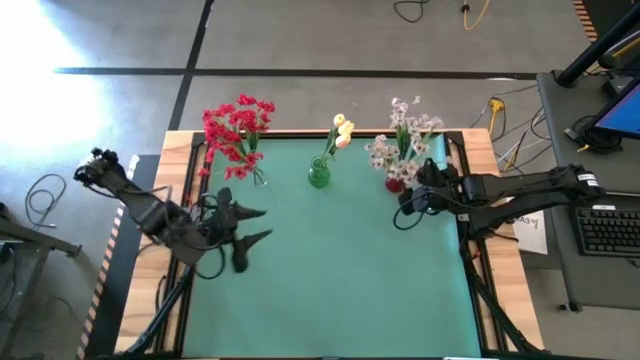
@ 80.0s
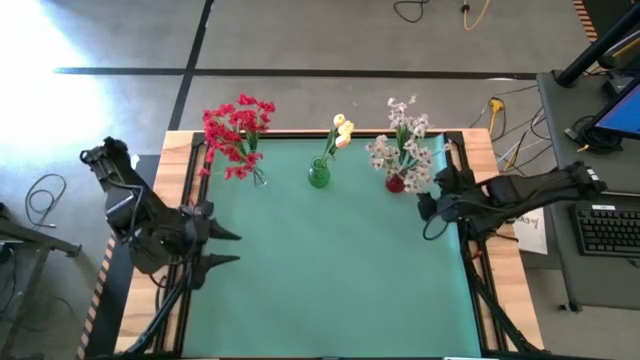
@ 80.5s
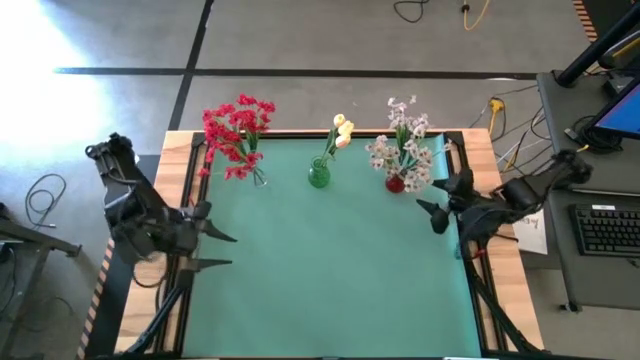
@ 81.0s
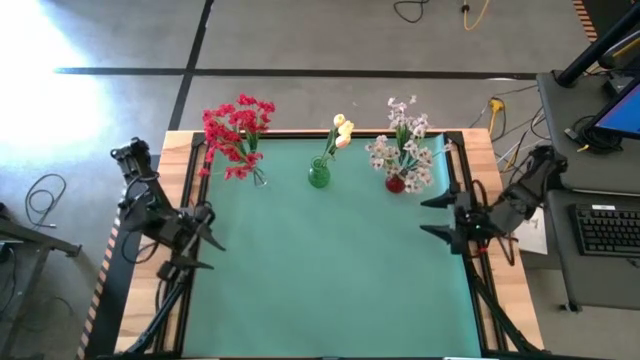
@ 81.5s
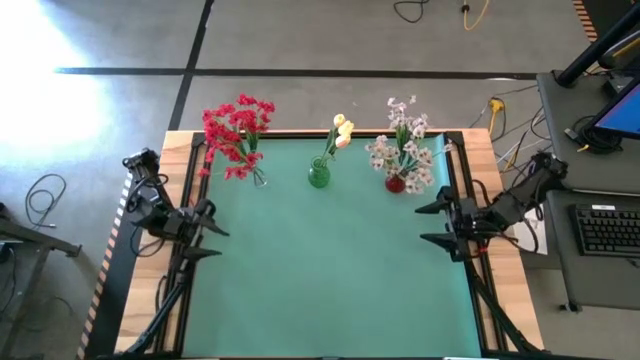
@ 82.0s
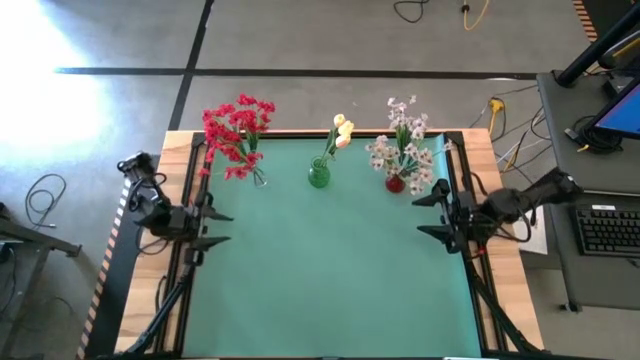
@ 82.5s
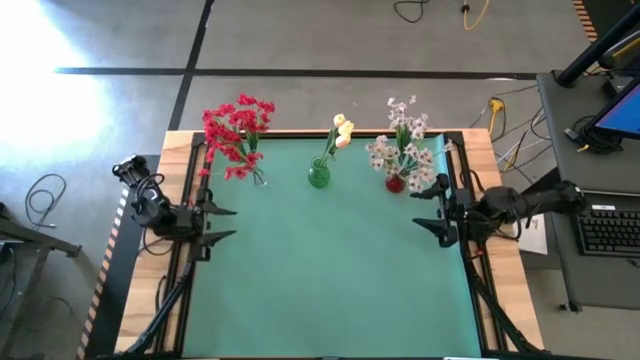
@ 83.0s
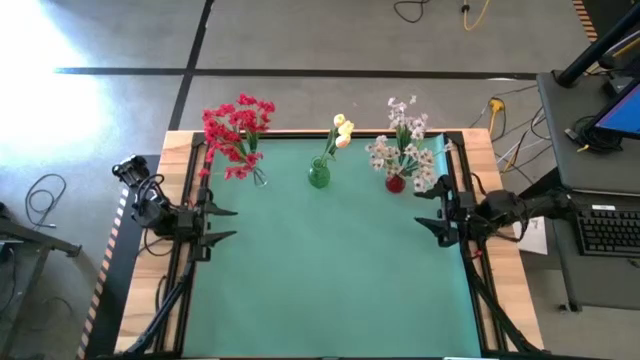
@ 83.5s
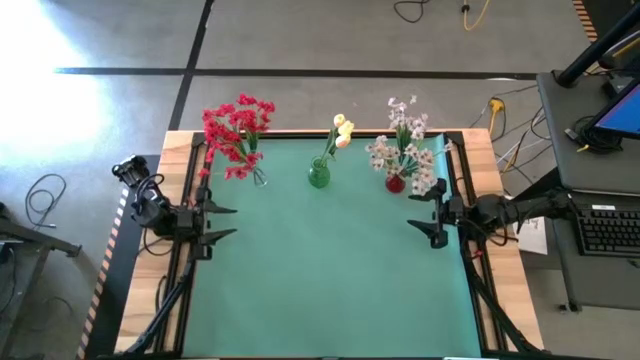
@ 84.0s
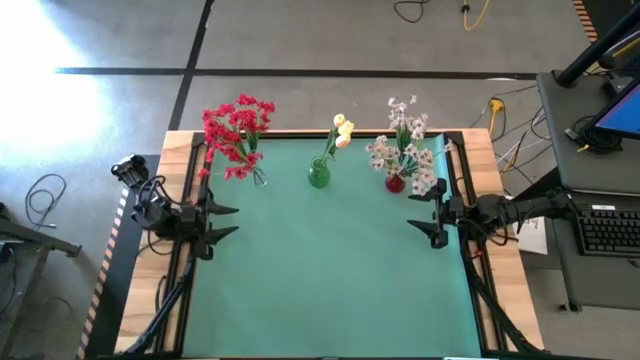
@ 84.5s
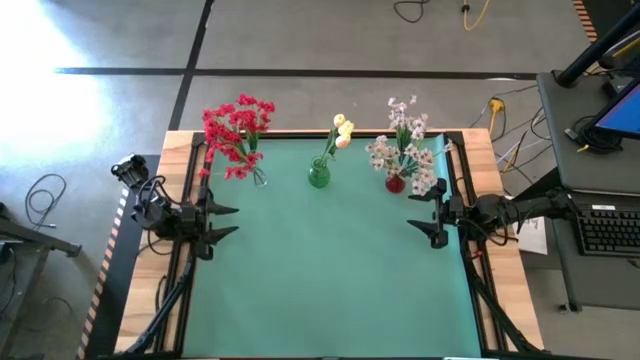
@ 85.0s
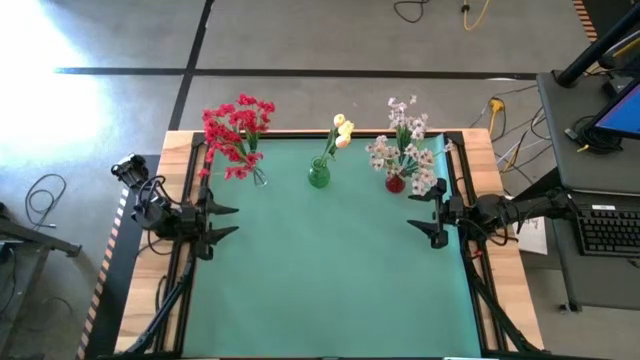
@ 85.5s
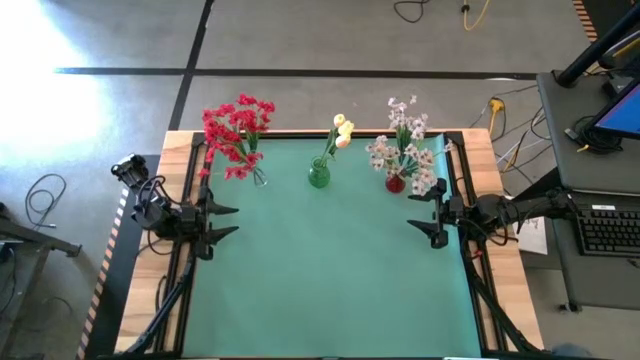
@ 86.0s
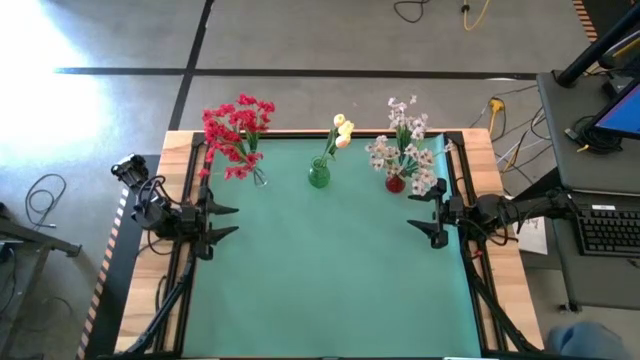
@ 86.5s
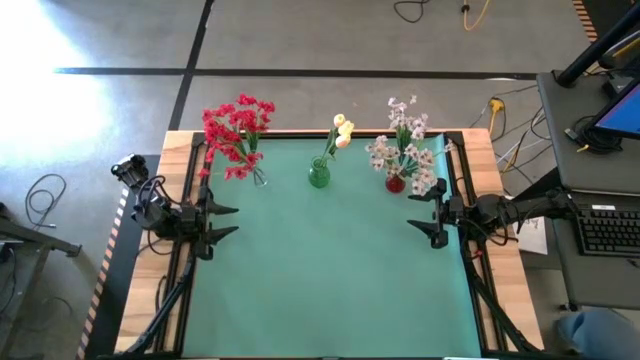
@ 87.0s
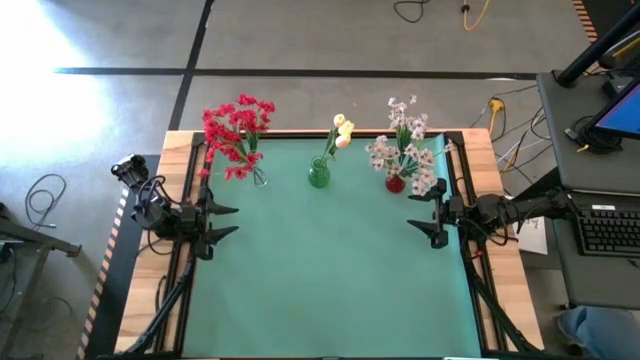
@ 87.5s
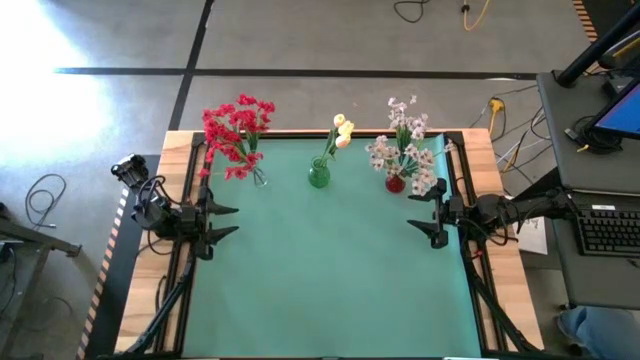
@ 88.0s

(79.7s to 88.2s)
Task: Sort flowers into vase by color
Return to Home Position

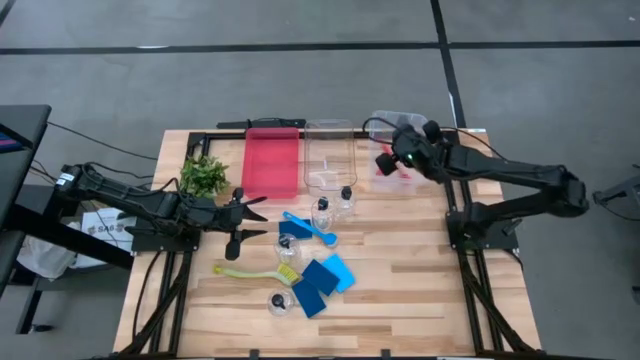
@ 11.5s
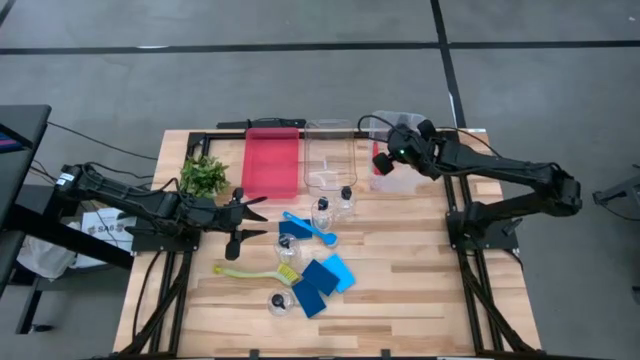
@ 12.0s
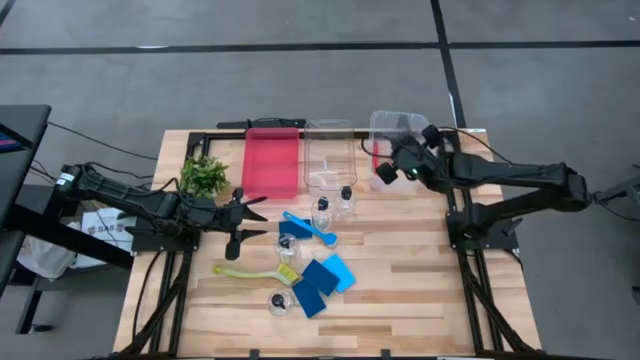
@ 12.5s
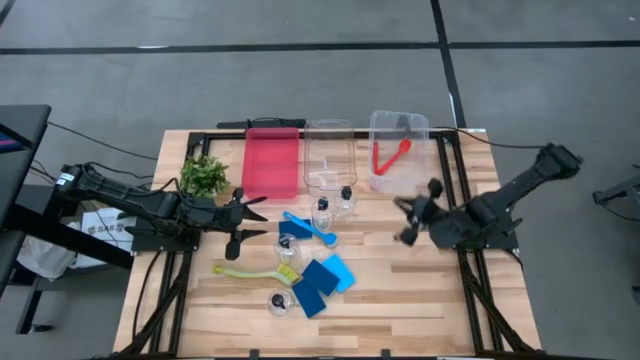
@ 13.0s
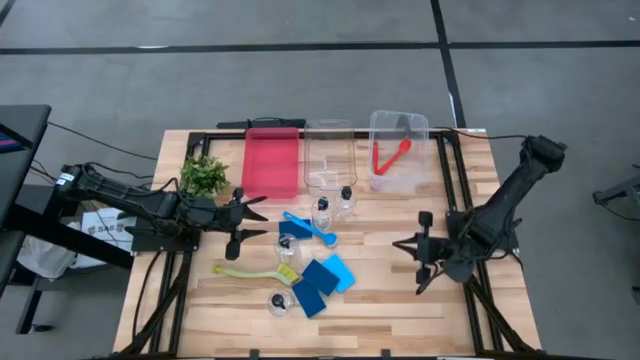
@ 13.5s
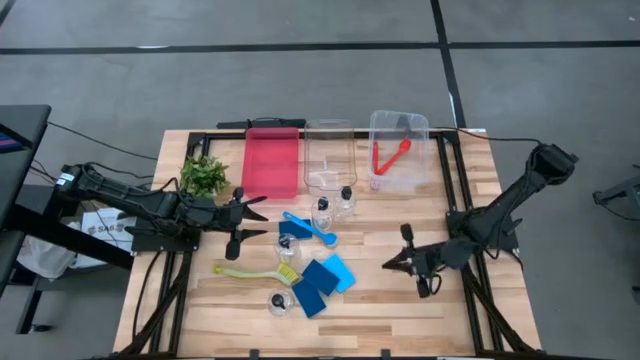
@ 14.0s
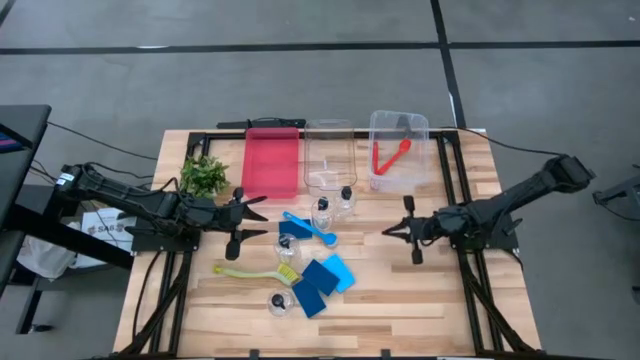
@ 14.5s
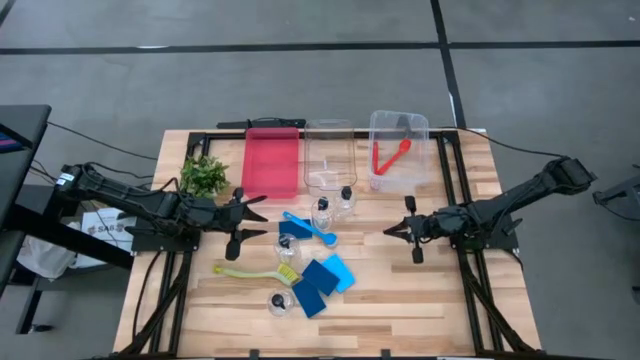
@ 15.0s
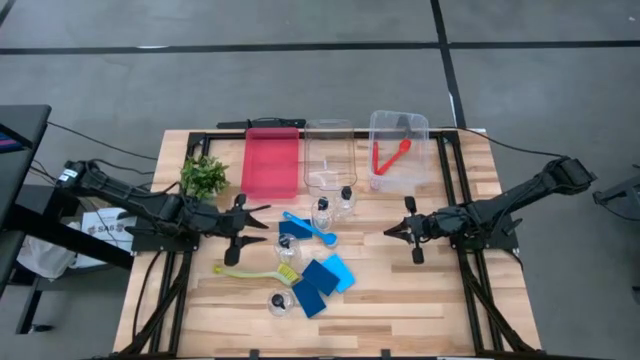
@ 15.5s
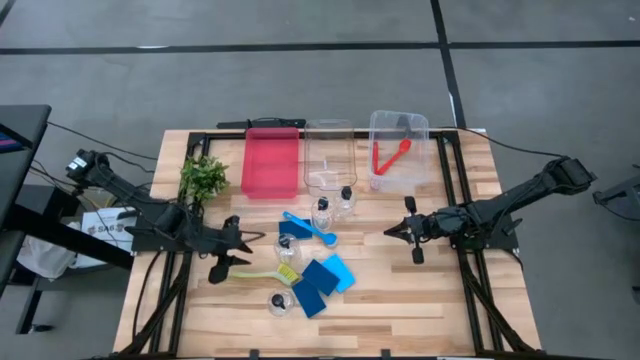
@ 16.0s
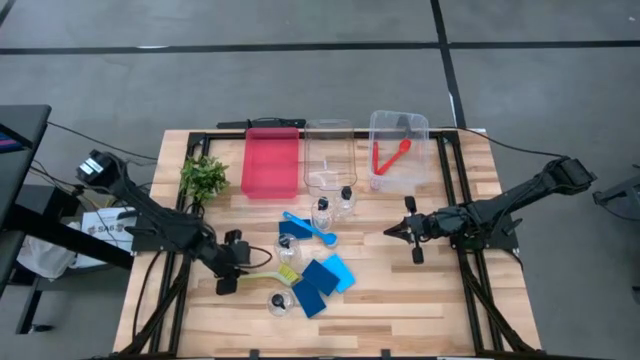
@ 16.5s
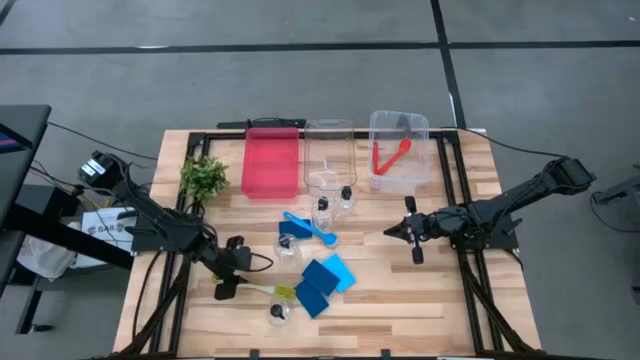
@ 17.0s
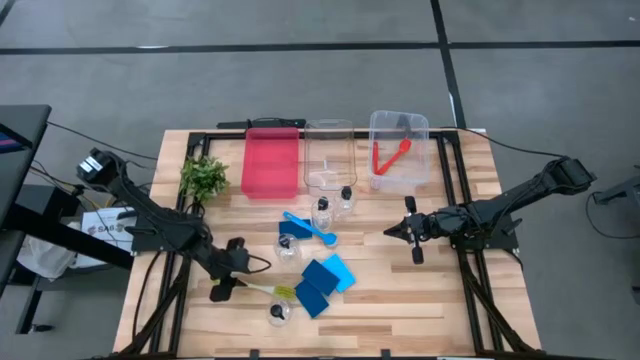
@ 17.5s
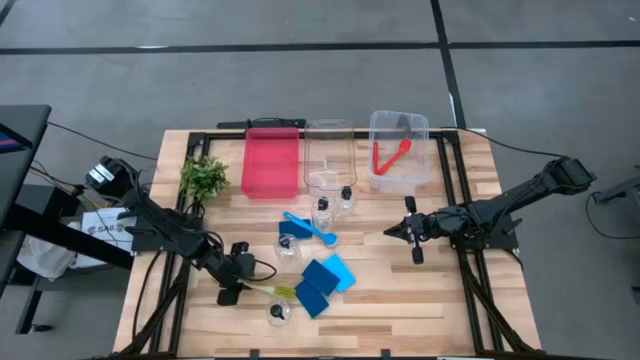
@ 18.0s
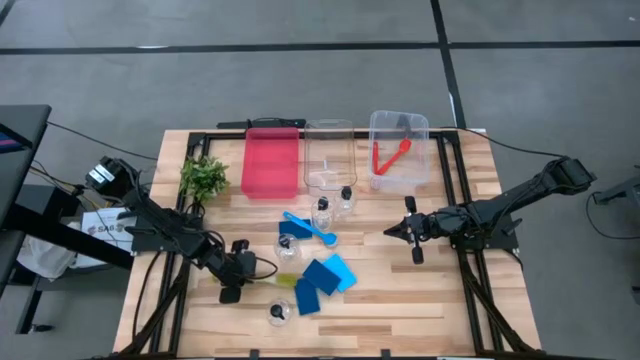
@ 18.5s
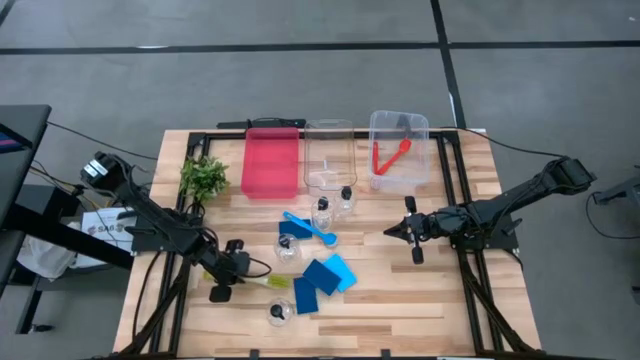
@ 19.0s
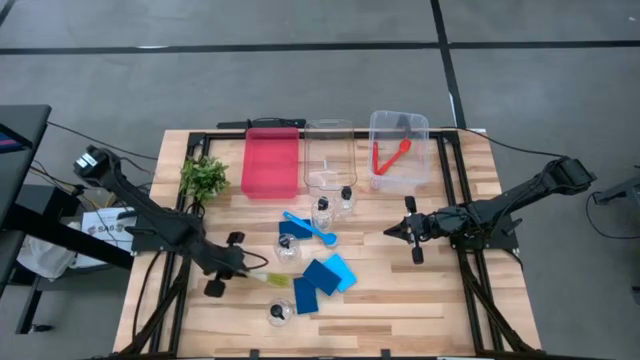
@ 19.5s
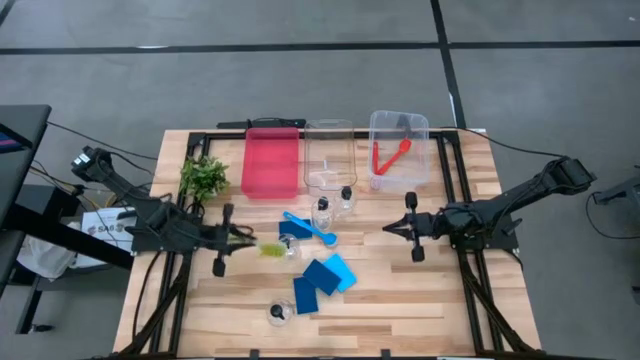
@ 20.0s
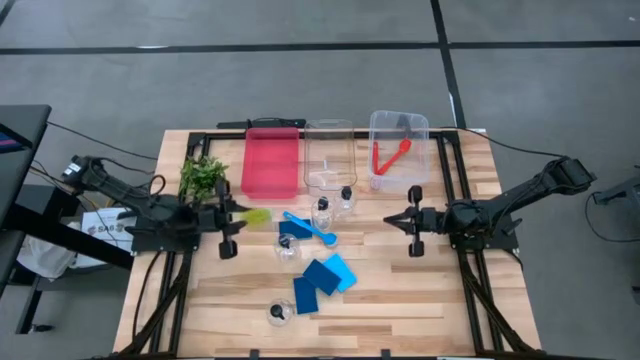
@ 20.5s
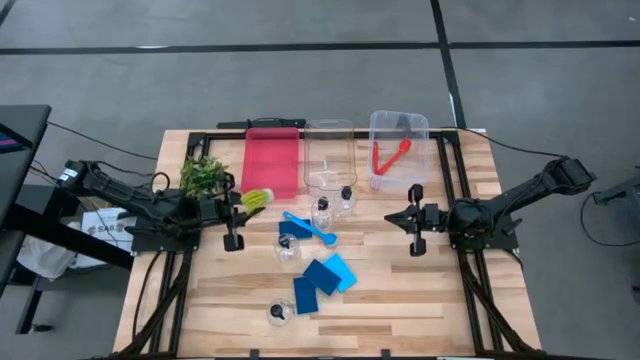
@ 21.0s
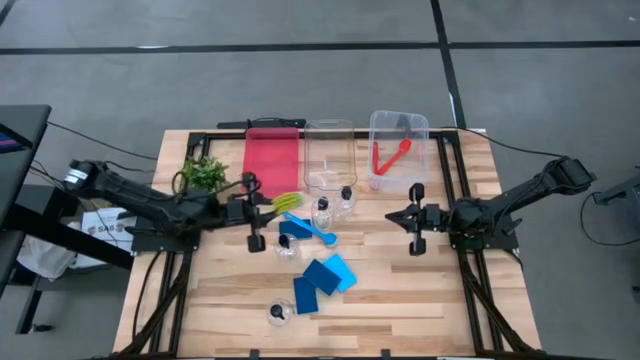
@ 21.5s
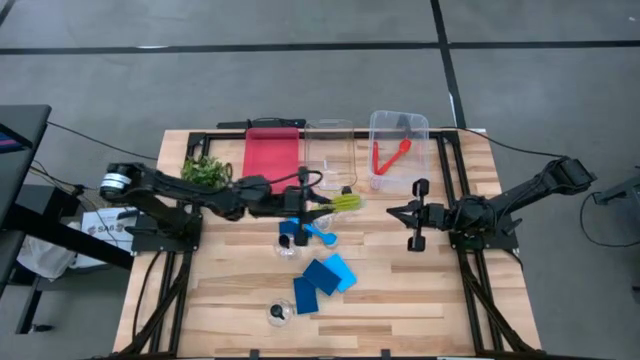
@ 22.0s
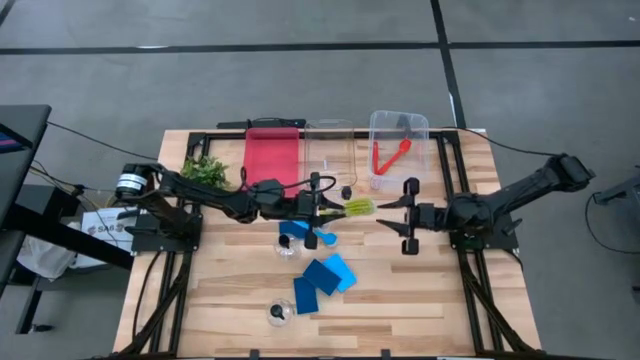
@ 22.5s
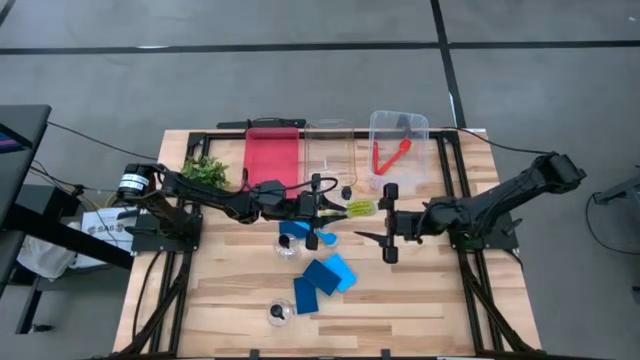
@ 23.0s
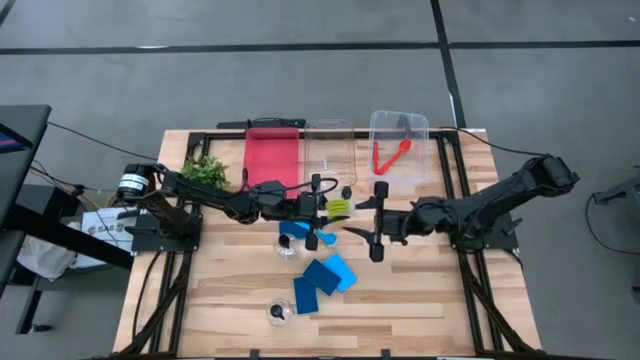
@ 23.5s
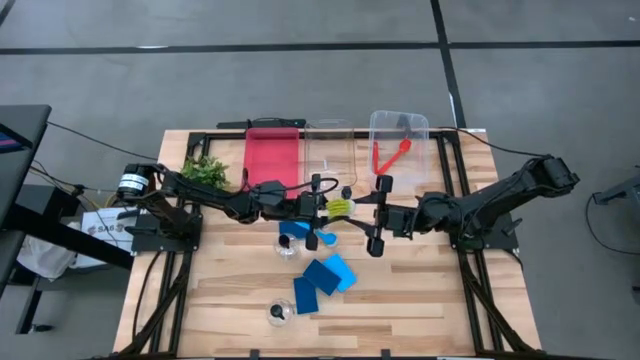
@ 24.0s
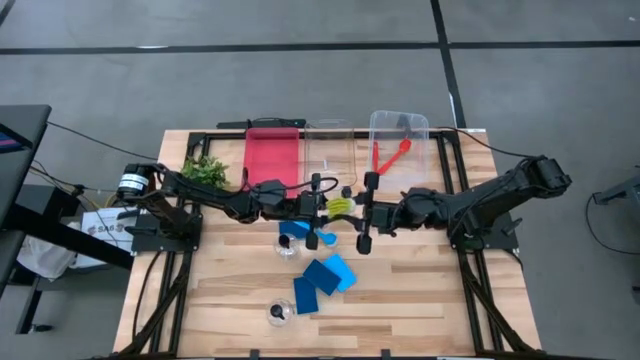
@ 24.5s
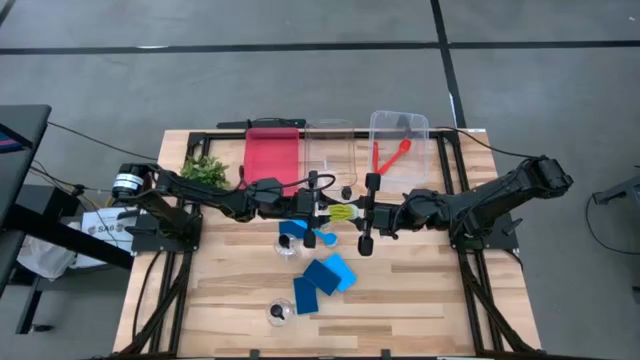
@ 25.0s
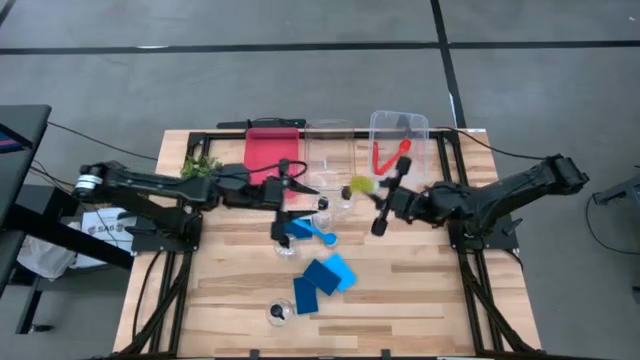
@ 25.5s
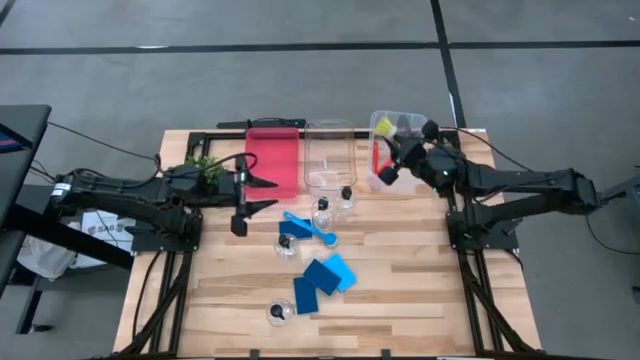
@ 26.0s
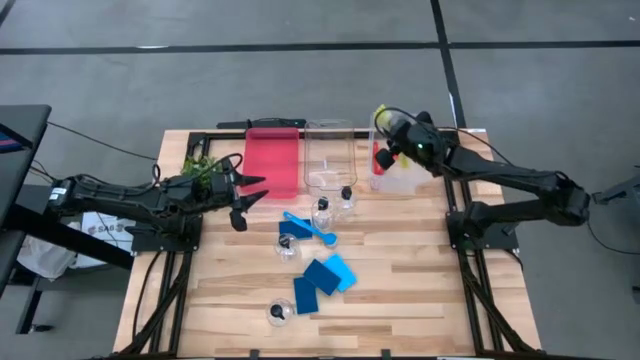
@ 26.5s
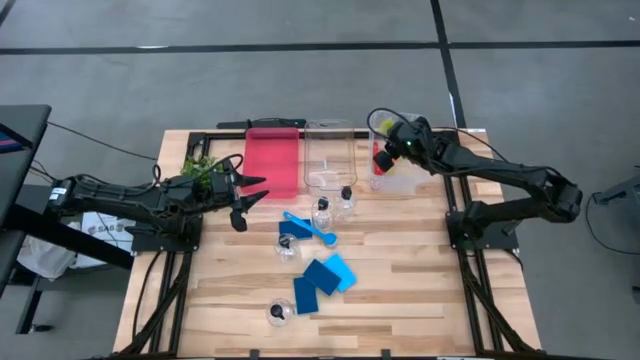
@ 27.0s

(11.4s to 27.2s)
Task: Pick & Place Kitchen Sink Supplies
Put the green dish brush into the right transparent bin
